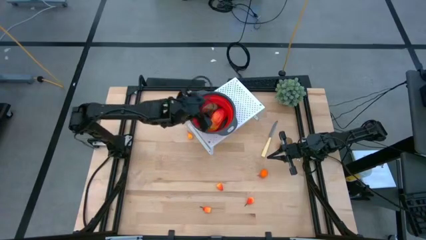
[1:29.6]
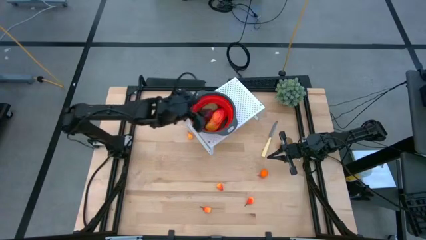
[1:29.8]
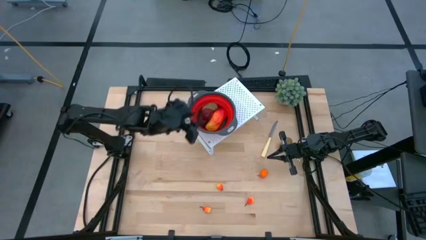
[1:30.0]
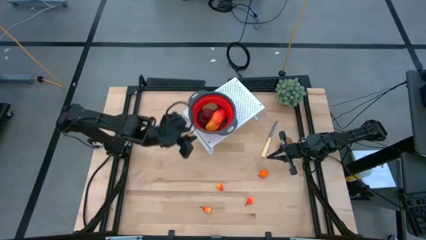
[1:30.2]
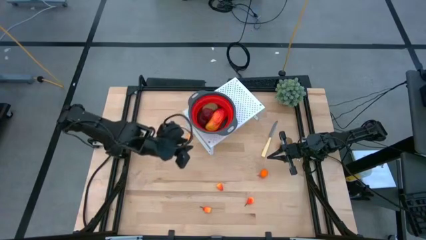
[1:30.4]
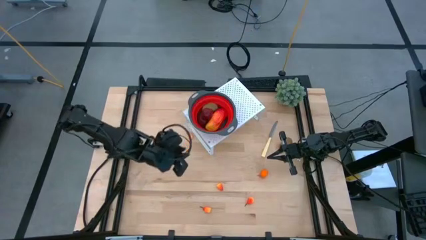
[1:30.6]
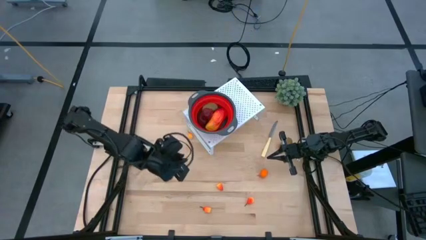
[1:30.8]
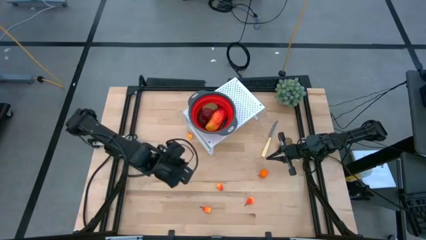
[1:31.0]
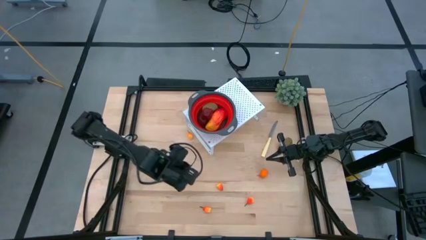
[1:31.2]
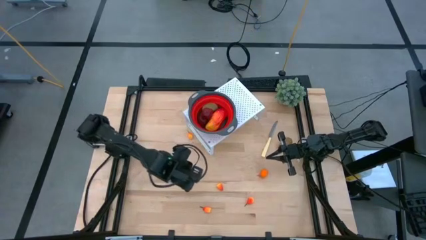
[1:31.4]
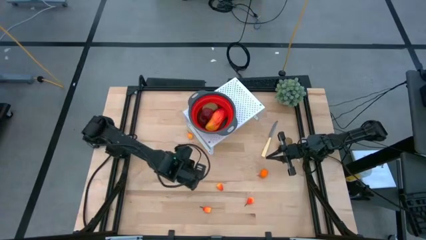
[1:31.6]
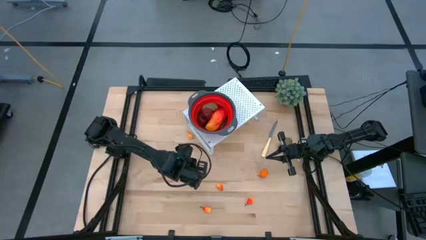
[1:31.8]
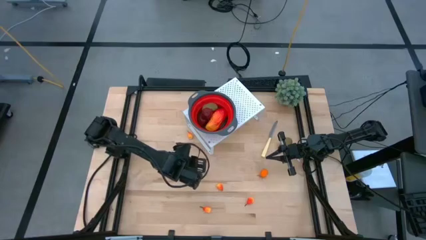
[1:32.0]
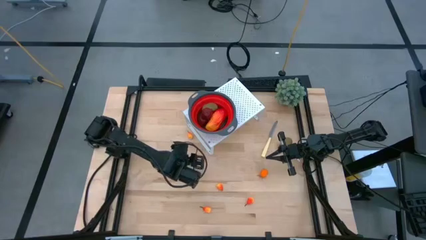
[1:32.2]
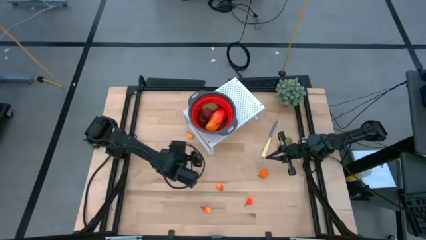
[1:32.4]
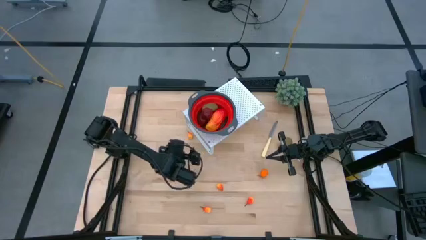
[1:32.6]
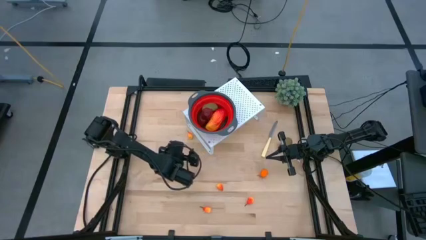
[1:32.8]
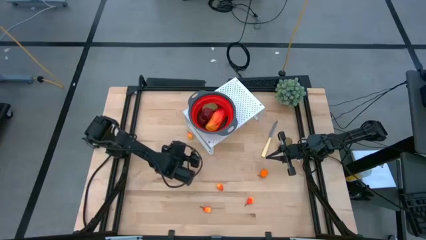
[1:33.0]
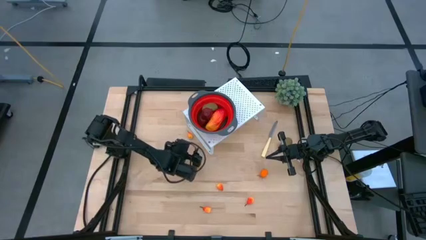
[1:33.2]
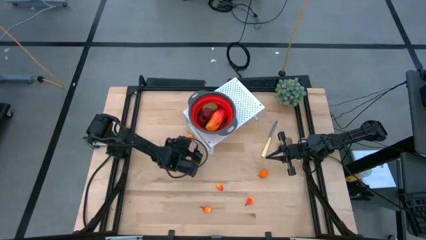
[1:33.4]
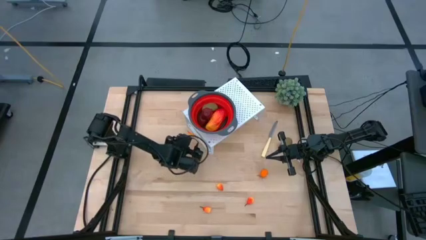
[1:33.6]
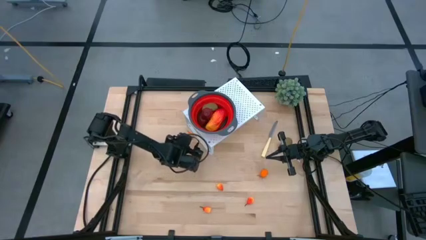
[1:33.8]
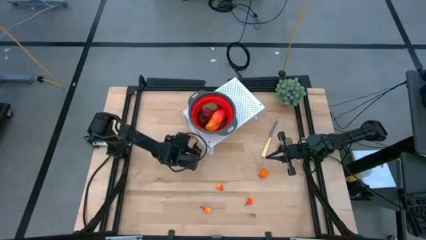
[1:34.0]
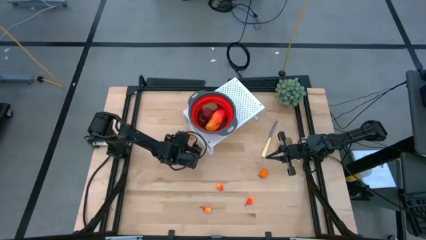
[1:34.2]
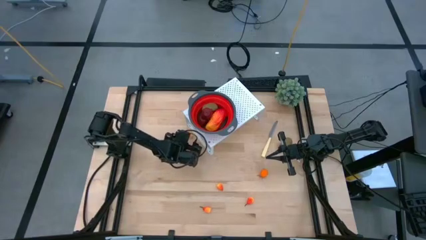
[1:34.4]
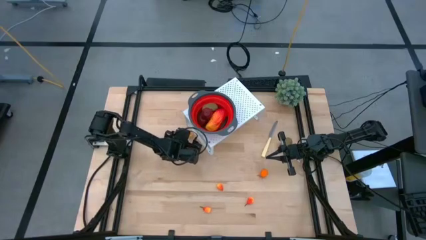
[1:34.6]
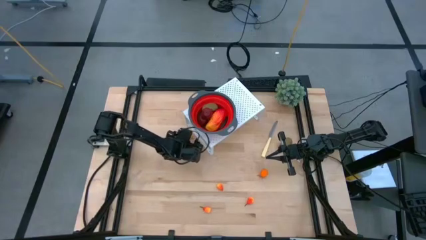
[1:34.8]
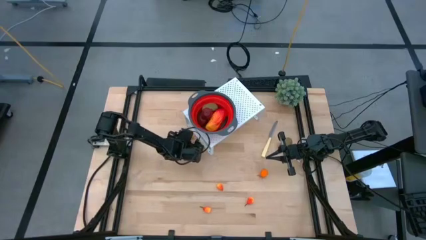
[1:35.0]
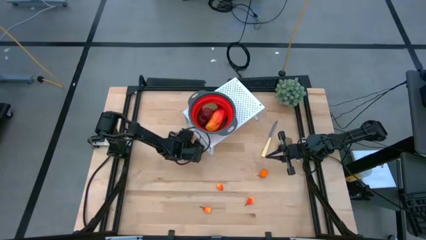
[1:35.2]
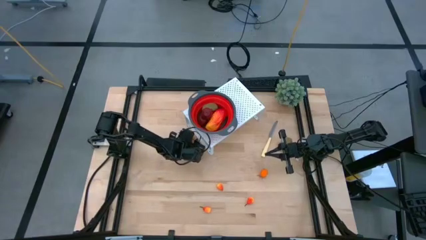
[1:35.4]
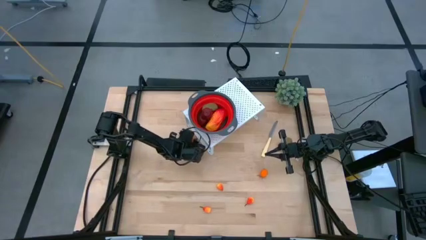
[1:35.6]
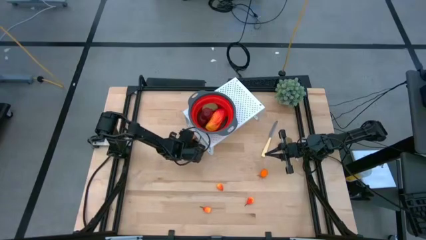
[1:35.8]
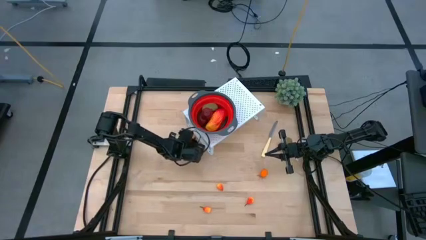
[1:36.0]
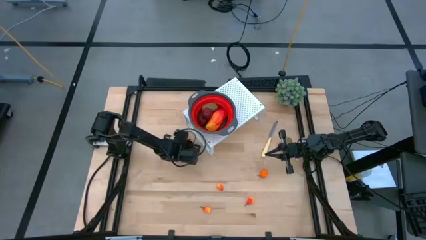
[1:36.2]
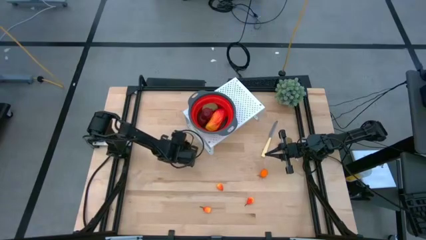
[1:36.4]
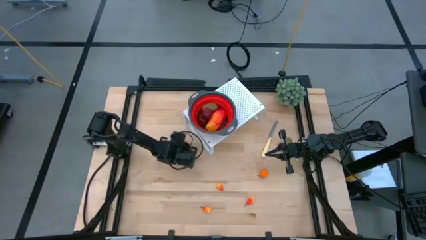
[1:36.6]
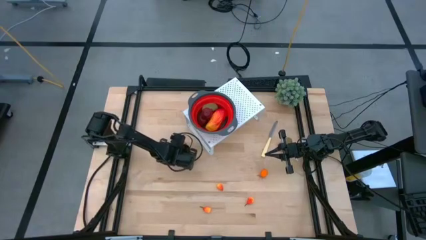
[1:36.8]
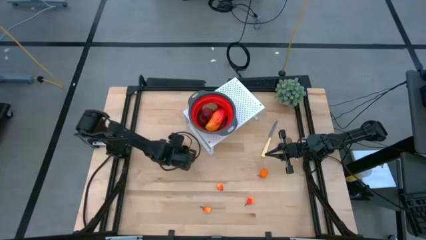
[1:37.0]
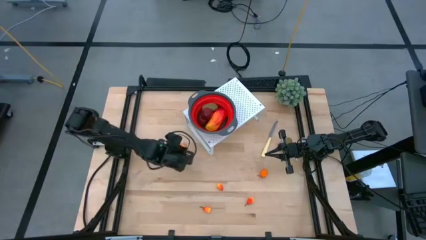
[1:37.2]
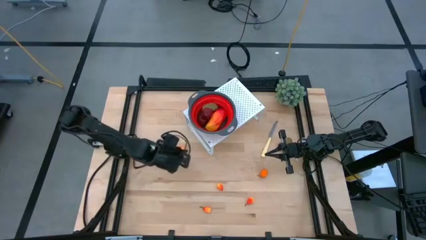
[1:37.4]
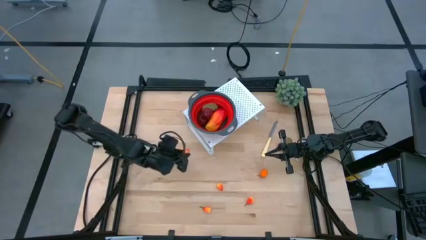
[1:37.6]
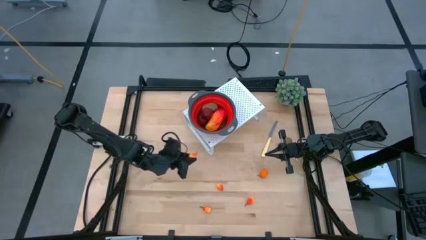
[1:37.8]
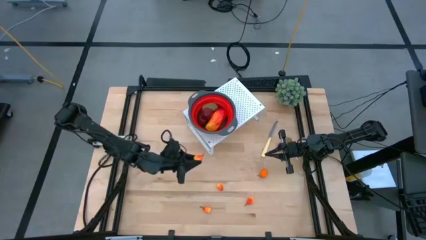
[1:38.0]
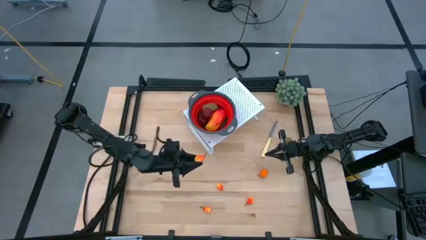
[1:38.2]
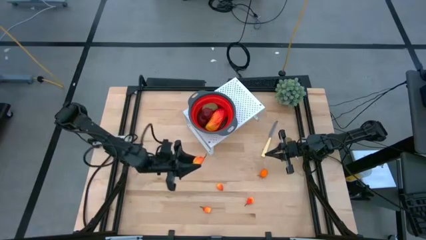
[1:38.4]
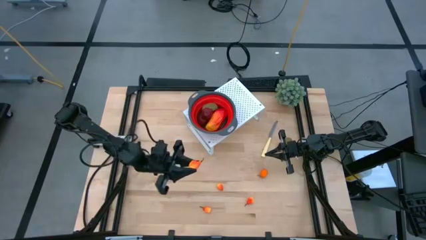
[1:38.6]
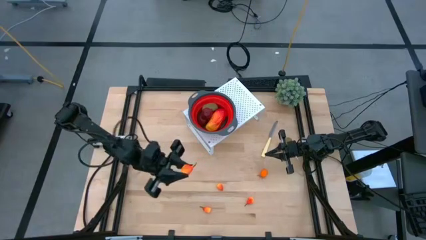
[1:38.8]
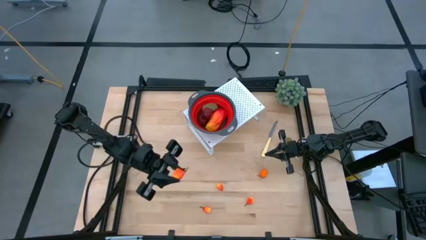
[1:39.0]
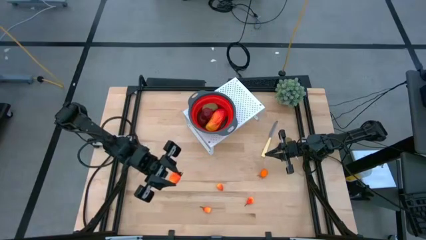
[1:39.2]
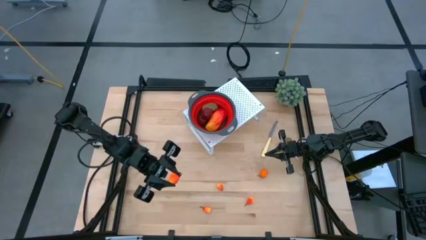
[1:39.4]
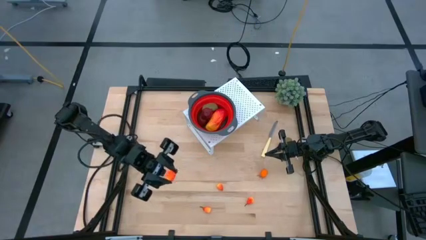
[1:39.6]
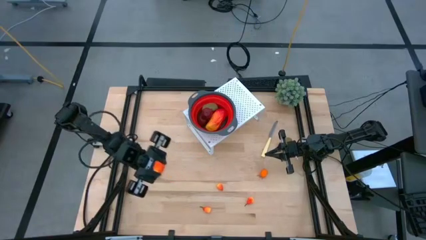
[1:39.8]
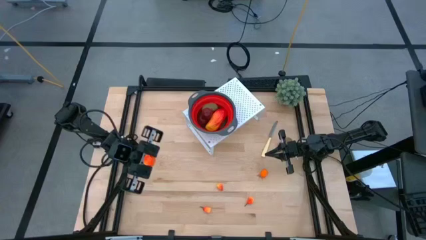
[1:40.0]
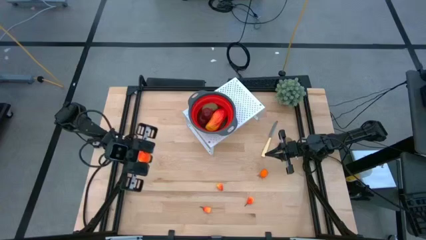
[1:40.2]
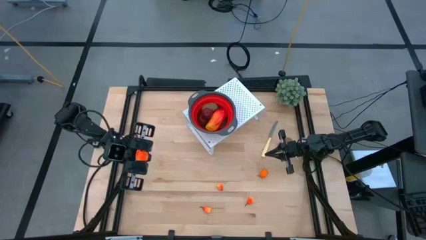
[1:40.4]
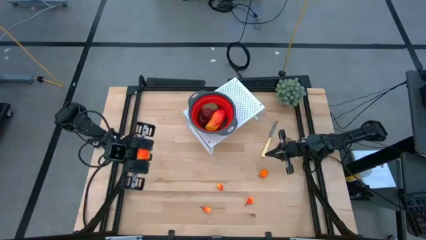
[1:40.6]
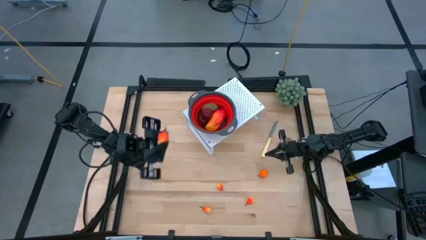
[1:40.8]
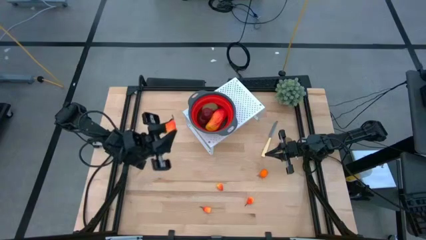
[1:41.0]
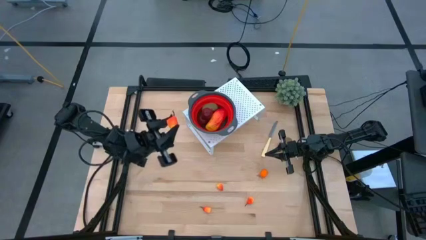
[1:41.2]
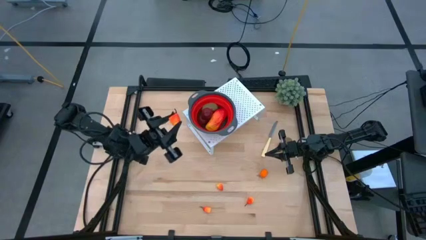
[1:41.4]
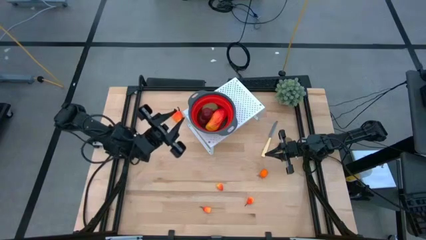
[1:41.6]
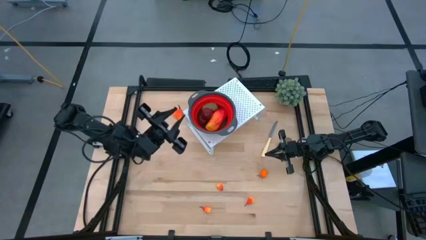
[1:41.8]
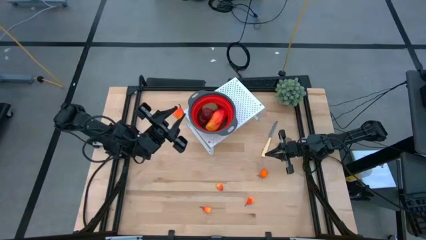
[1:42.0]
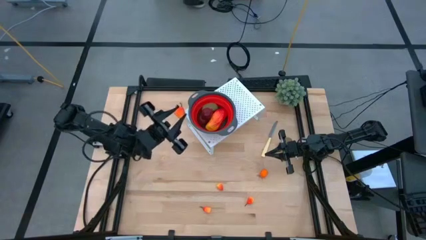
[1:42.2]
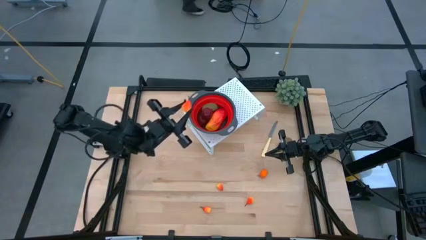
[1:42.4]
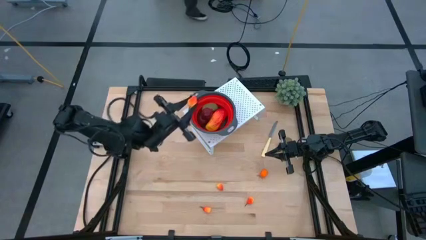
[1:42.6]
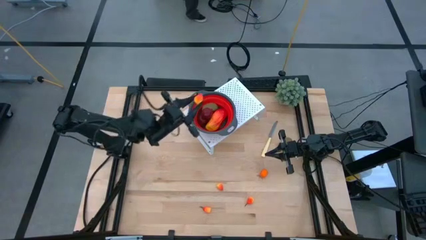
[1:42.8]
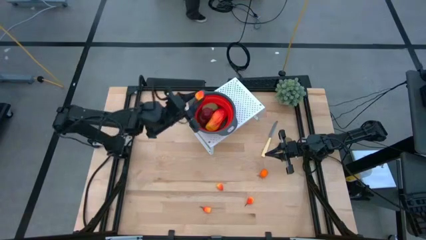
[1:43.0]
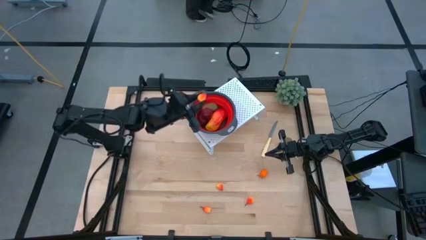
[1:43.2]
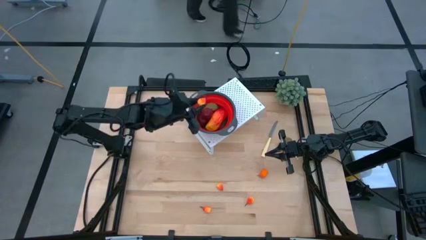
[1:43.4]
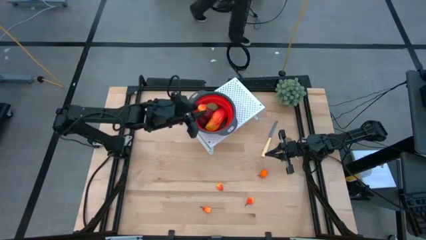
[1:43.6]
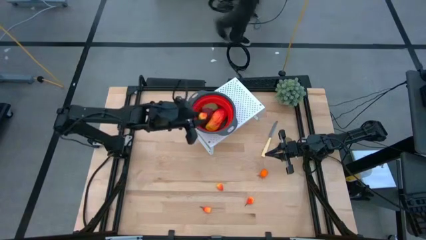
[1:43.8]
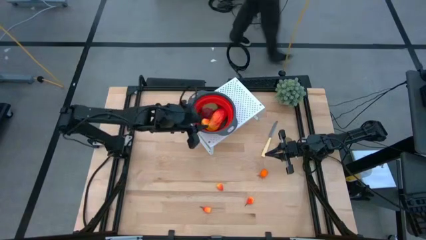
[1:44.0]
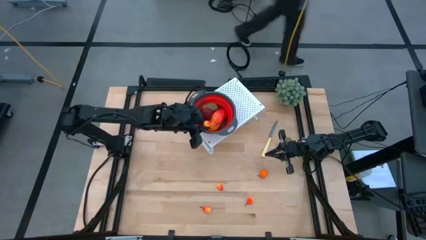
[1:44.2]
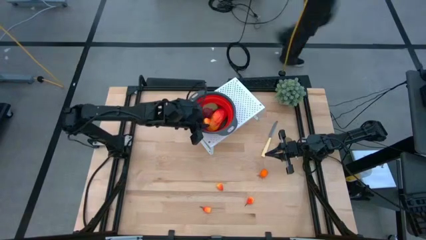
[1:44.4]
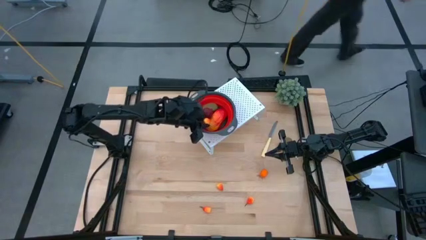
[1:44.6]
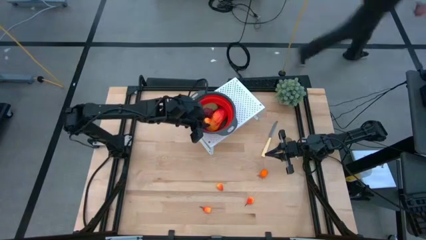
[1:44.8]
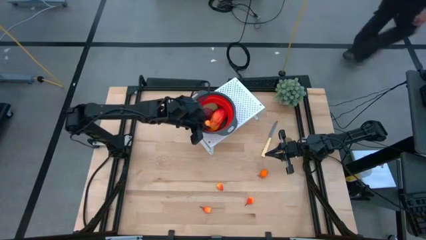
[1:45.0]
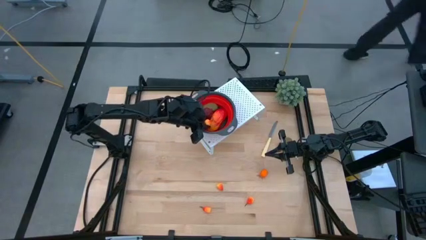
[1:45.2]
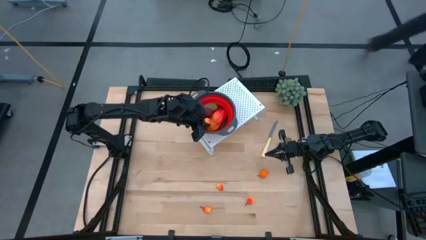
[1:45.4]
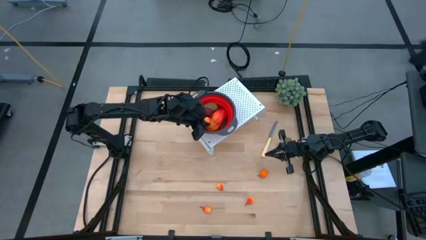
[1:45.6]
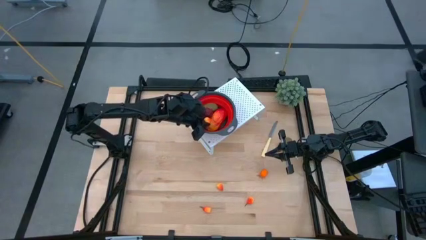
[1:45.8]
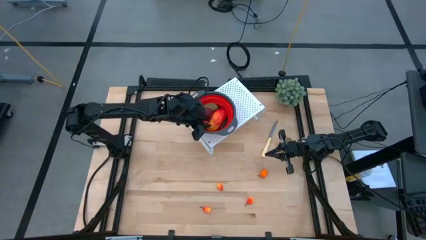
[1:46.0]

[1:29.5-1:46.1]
Task: Pick & Place Fruit
Put the peach into the red strainer bowl on the shelf
